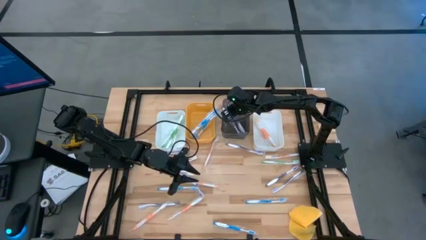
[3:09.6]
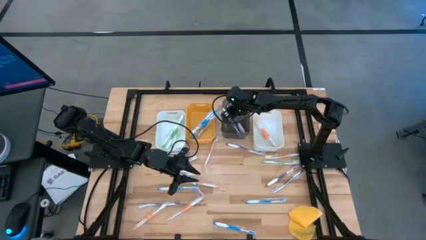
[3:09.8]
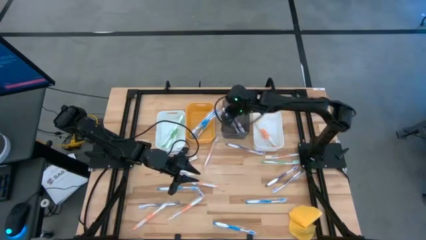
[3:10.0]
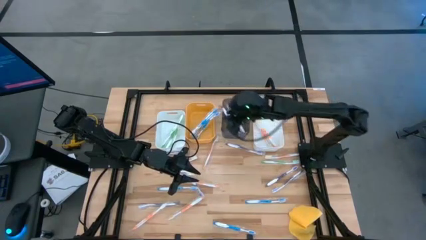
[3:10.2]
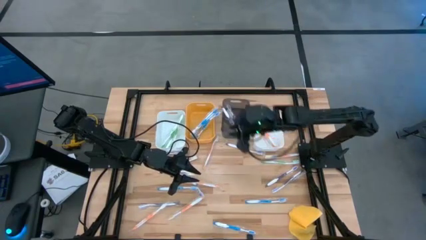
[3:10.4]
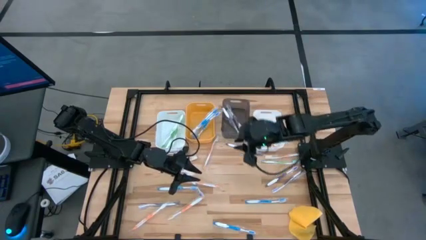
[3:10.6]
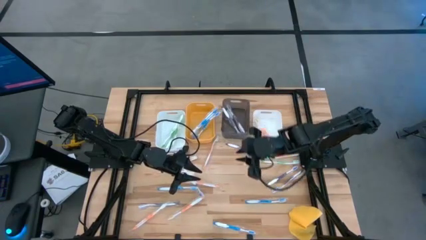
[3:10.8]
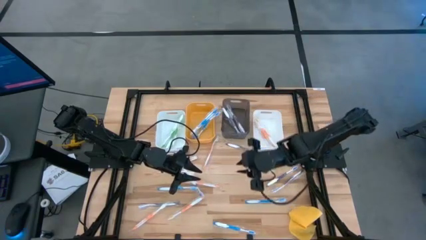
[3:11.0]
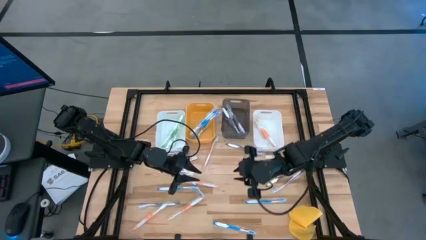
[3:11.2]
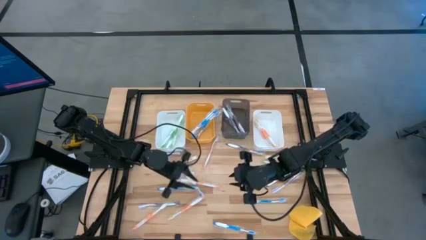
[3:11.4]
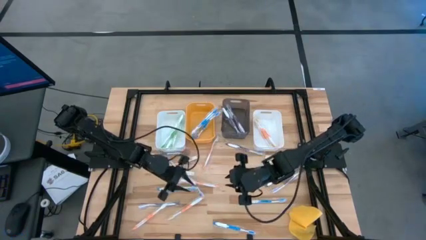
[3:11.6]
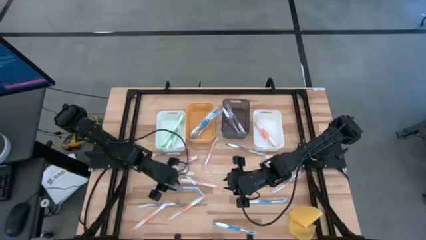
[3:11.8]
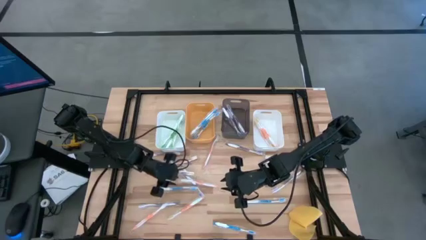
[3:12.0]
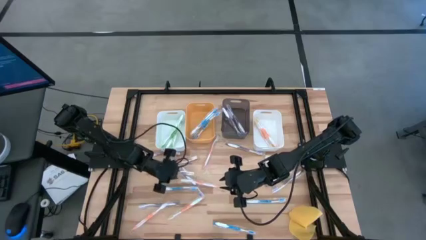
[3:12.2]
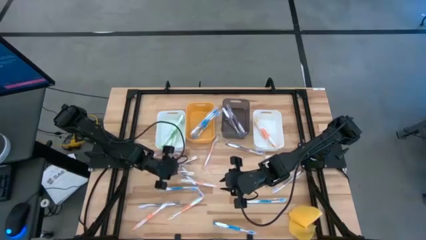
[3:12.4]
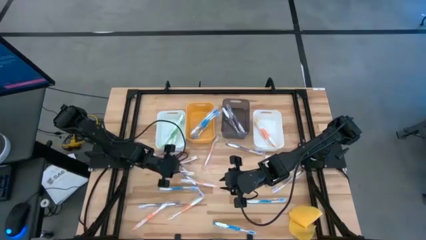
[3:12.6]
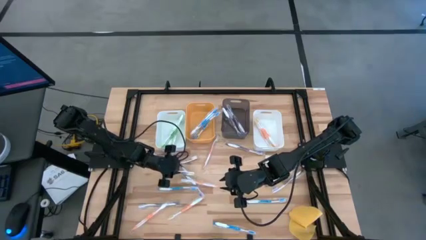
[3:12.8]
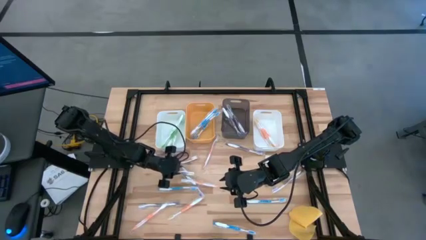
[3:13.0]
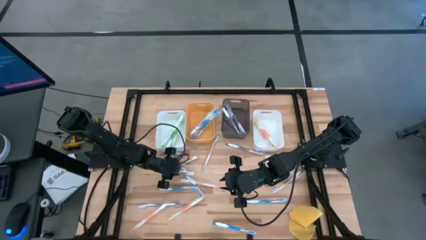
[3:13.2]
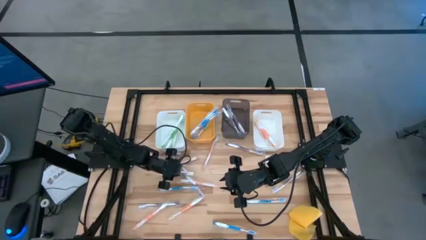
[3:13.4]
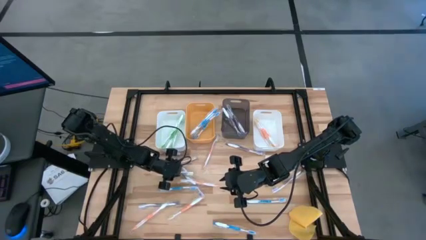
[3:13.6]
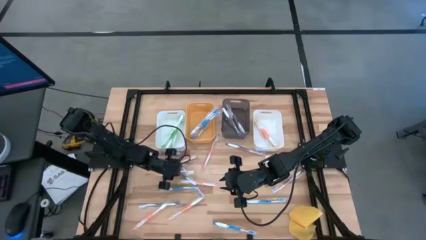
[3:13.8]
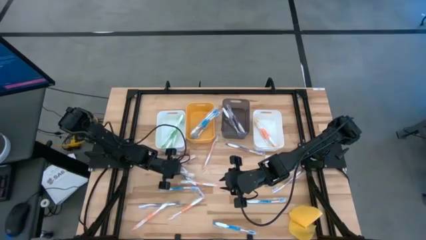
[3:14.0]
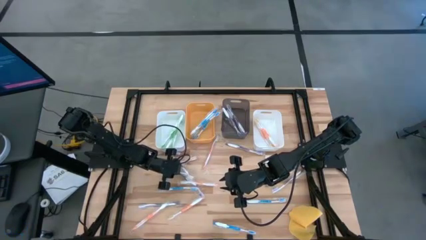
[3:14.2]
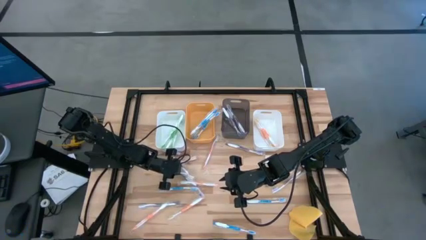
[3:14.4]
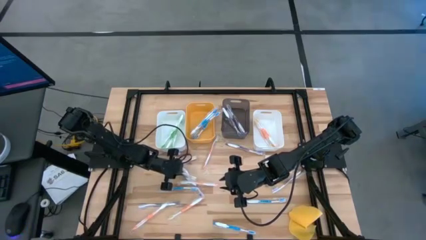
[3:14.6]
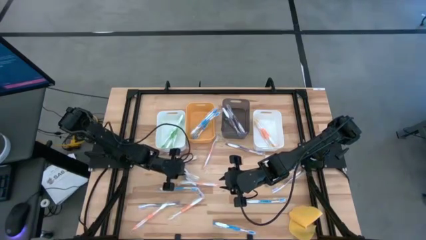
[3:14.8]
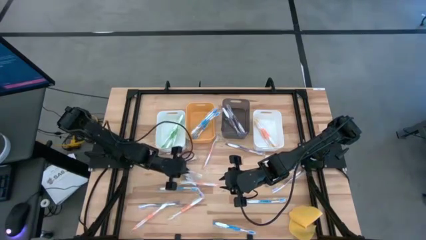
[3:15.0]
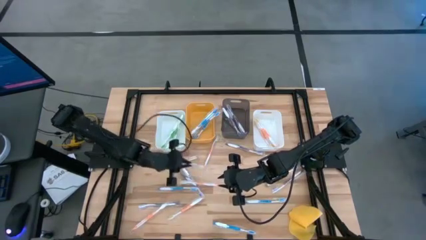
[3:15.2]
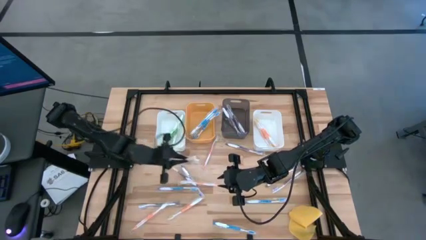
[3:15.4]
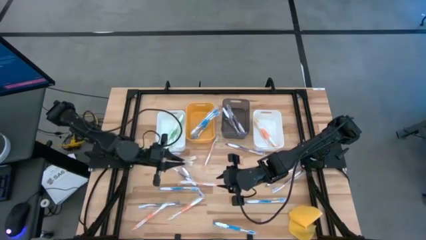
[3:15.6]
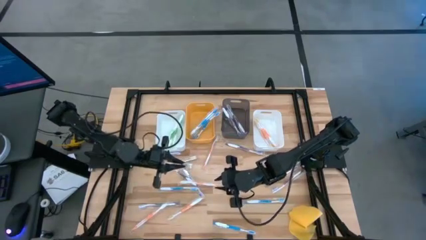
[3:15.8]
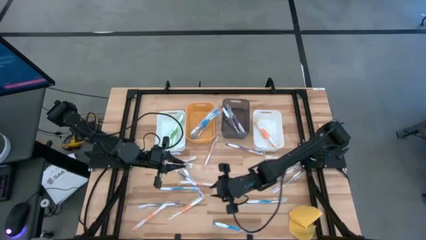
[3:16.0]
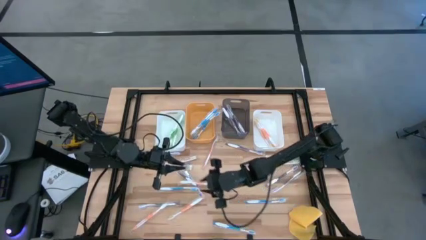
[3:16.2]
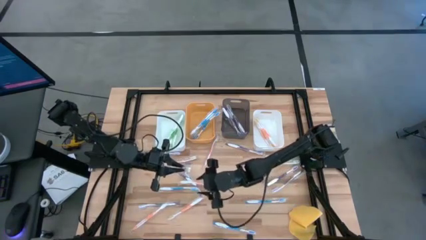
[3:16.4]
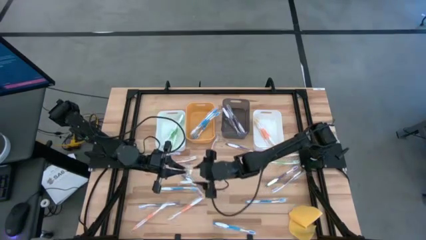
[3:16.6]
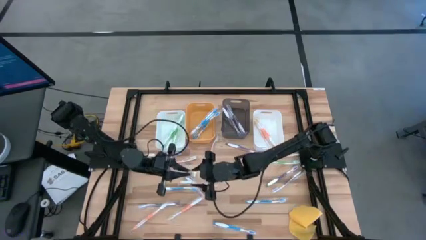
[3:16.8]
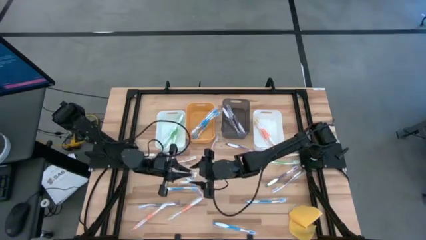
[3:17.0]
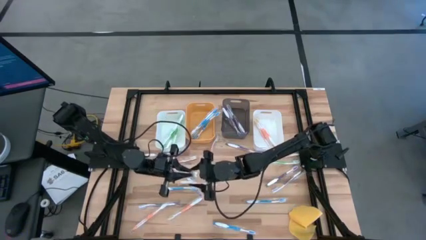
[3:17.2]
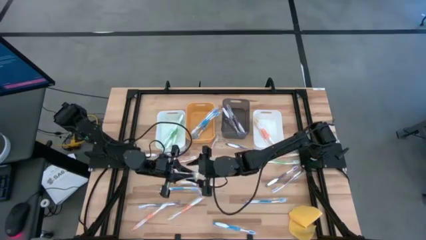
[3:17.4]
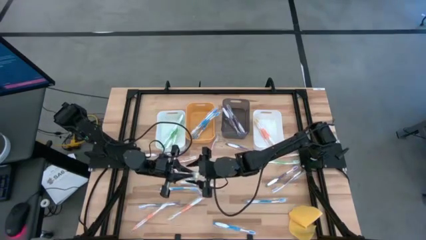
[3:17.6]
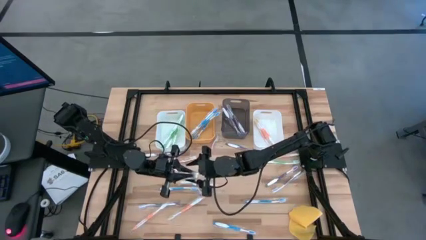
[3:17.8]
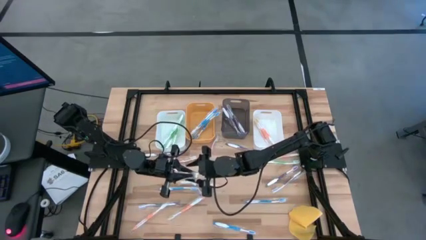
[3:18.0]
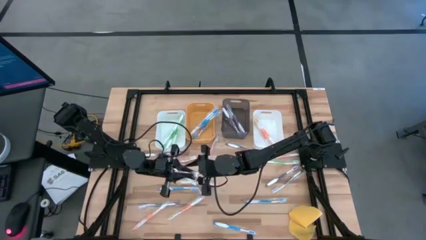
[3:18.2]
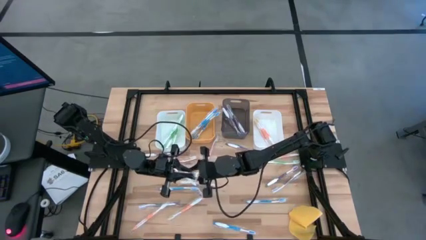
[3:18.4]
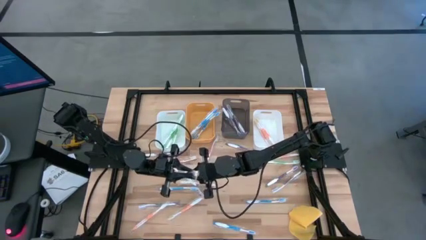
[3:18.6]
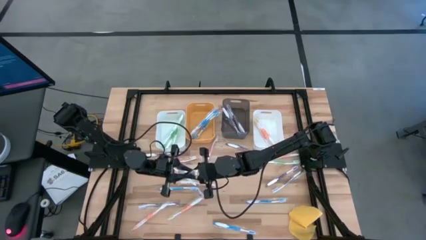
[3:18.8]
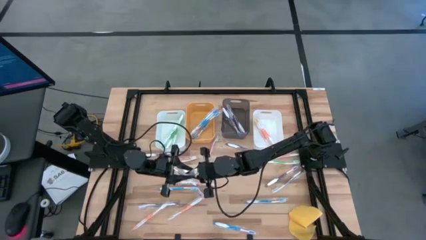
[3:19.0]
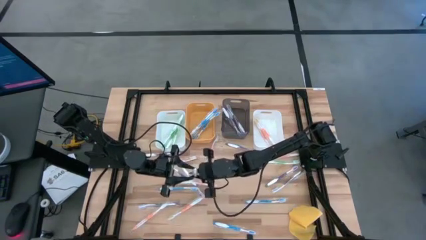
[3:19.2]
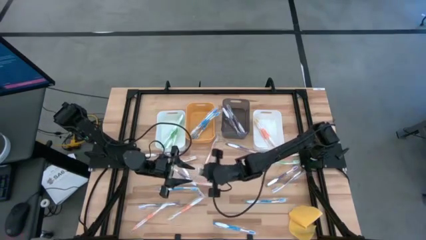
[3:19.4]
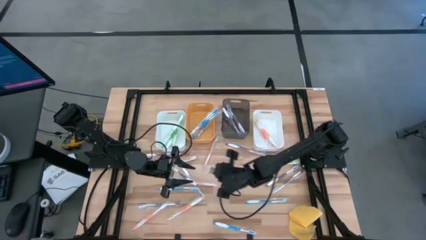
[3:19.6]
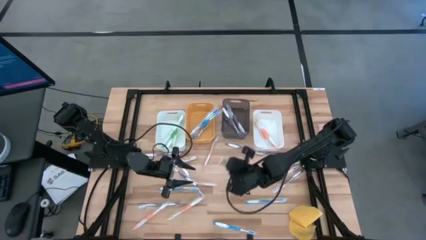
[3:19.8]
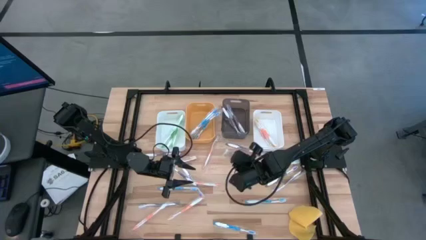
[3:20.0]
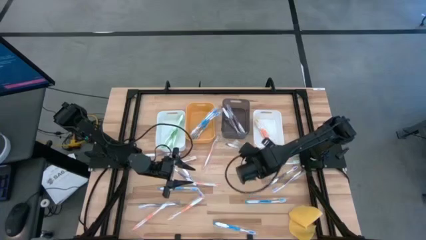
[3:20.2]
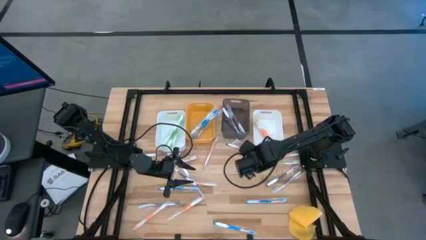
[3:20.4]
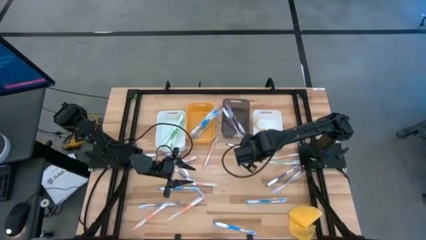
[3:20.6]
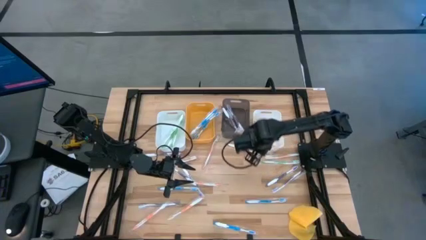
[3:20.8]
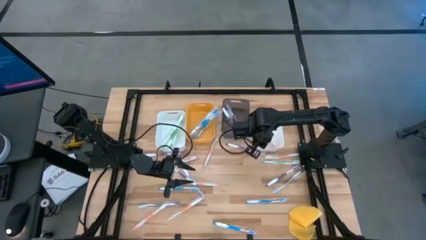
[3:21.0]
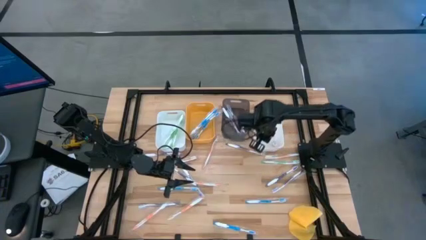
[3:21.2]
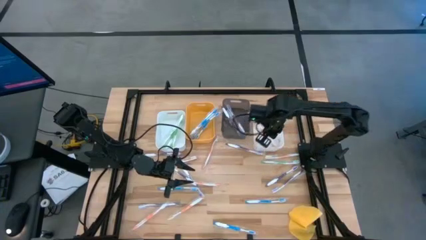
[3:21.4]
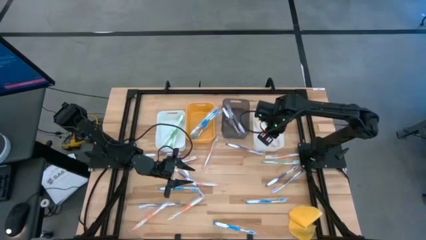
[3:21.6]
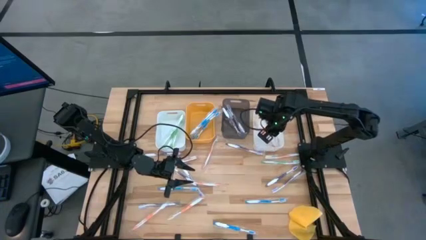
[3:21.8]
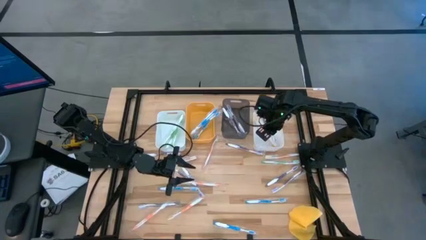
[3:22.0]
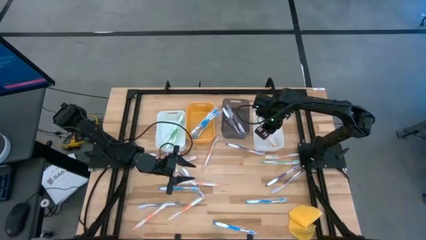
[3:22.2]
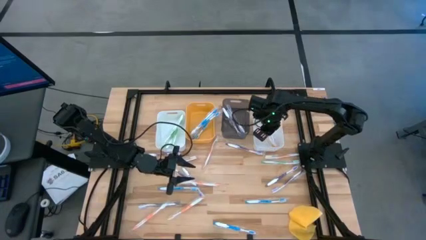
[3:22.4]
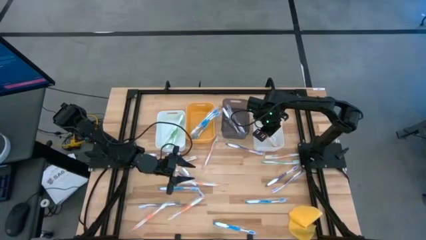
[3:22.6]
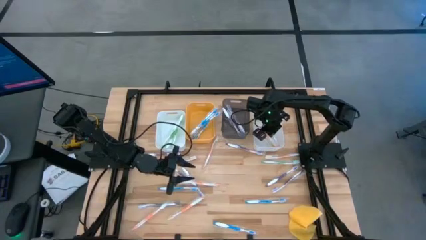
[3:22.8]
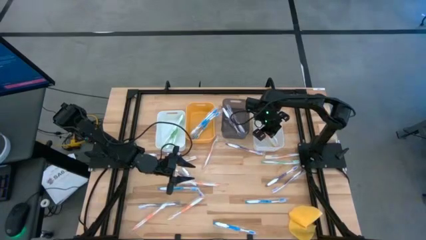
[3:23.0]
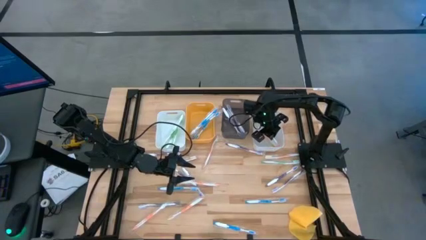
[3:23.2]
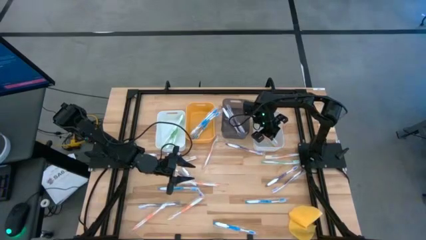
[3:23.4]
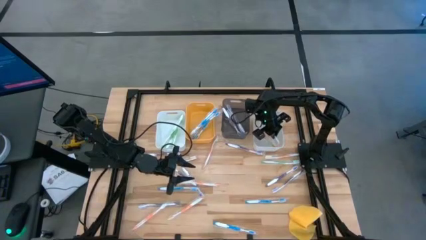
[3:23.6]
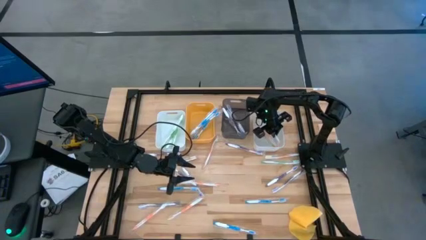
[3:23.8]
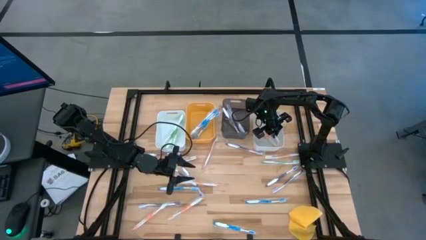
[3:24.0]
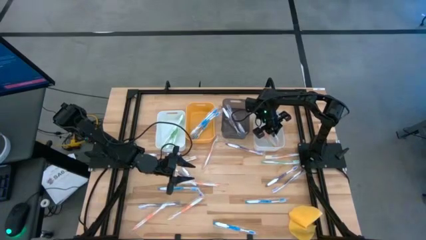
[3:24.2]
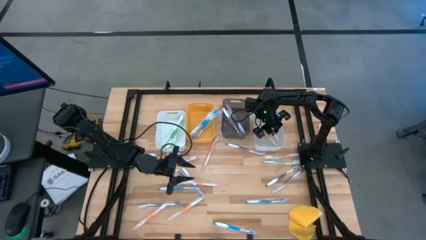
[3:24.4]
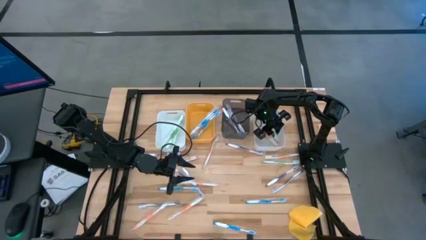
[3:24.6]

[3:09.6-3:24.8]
Task: Pick & Place Toothbrushes
Put the orange toothbrush into the right white bin
